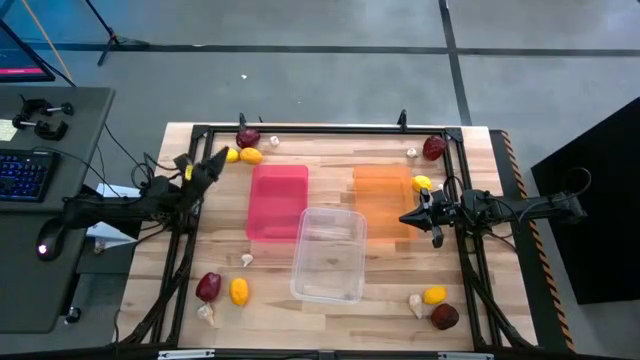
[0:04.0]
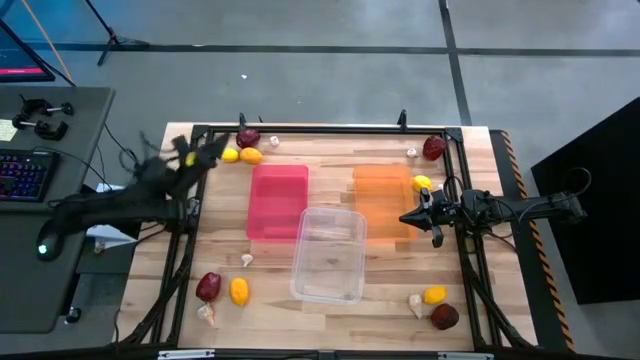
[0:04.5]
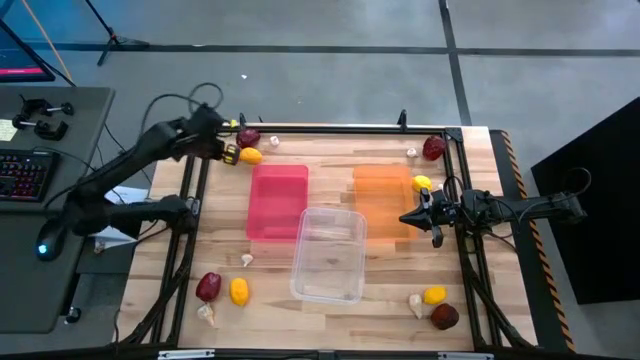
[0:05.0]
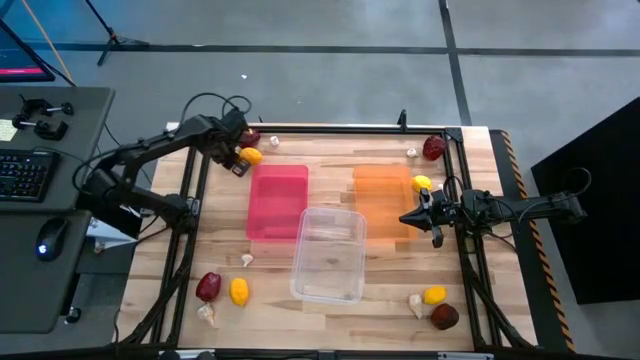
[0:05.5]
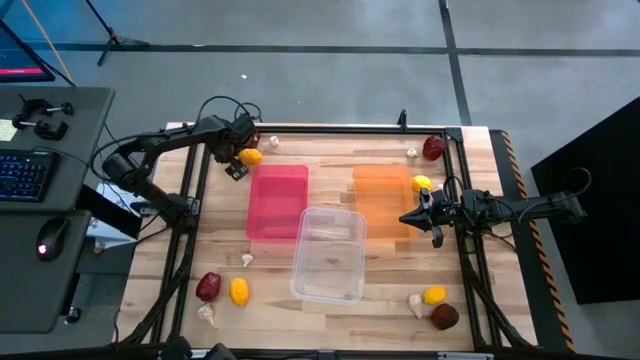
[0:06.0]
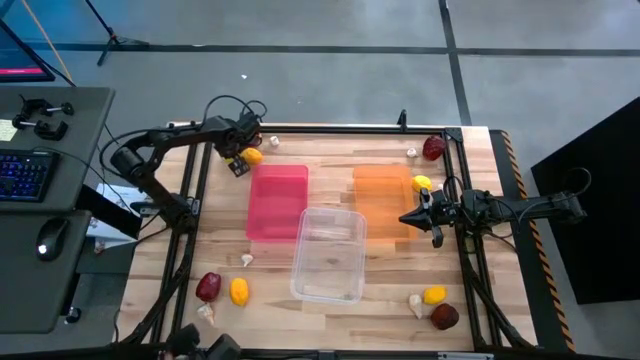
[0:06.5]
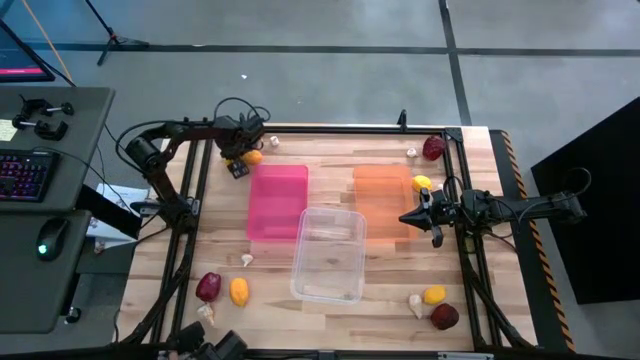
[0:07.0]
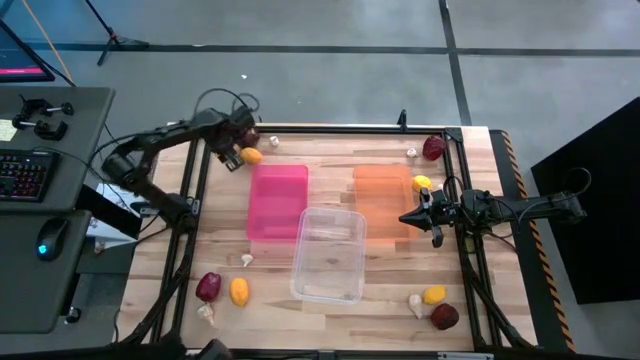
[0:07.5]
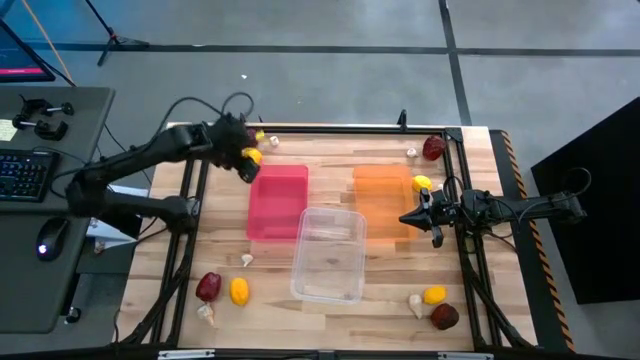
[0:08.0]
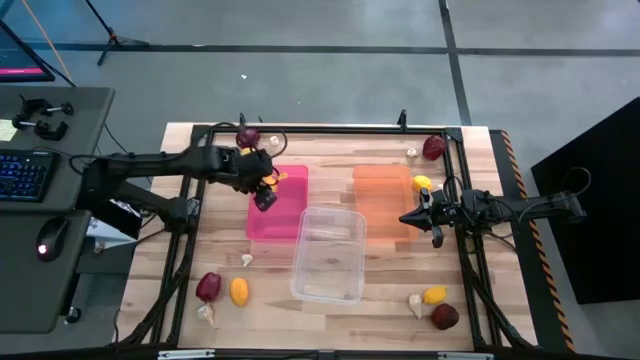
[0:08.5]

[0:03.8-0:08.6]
Task: Sort produce into baskets
Put the lemon into the pink bin

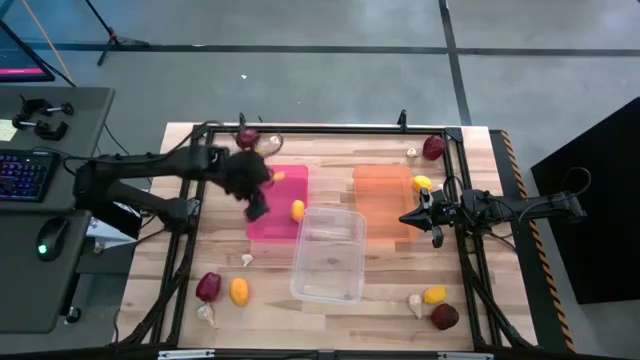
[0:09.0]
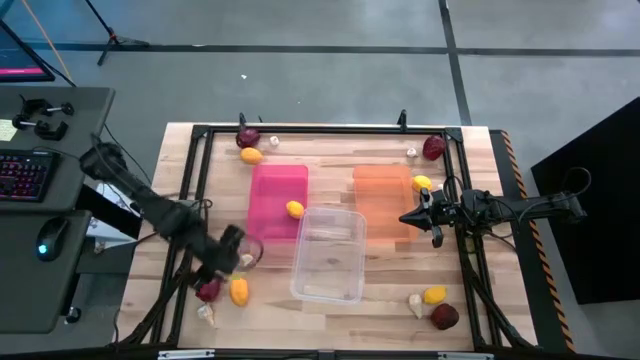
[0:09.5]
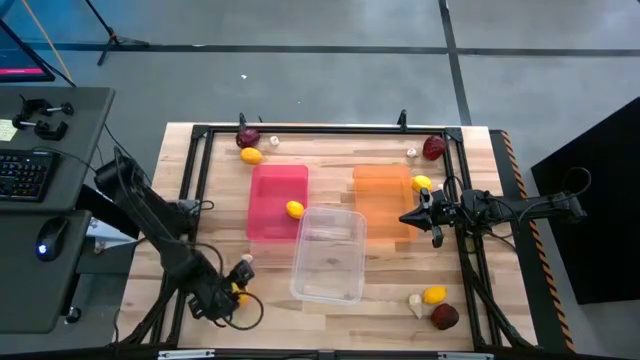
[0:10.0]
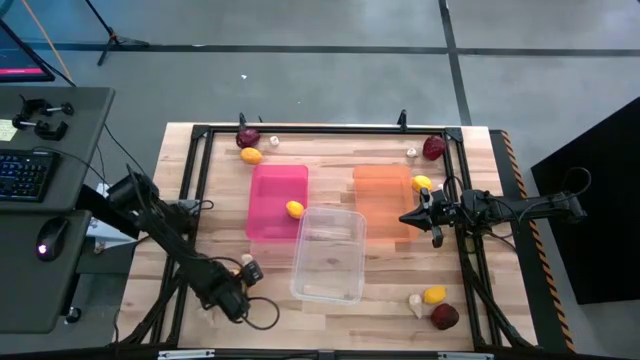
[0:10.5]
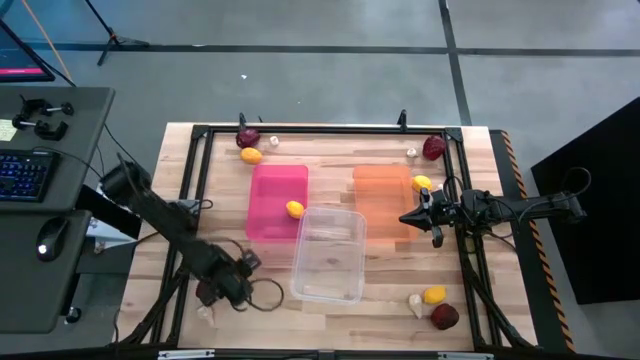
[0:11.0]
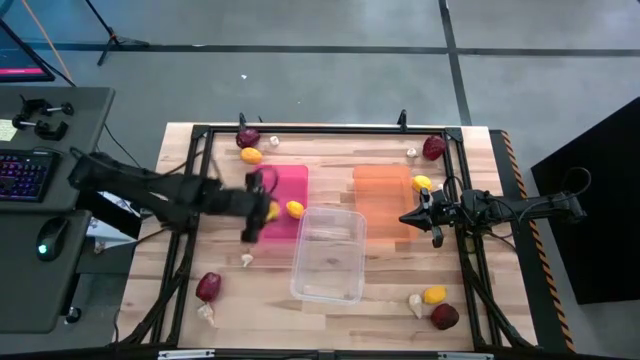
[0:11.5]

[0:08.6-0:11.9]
Put the lemon into the pink bin

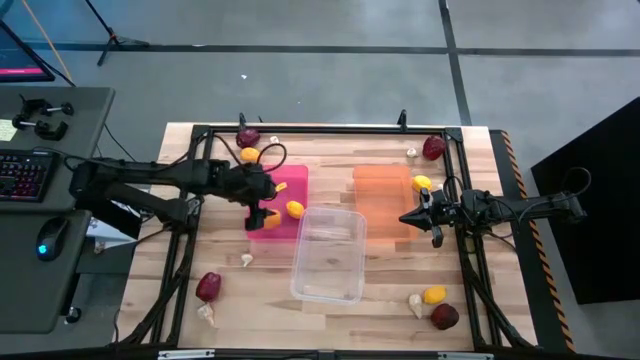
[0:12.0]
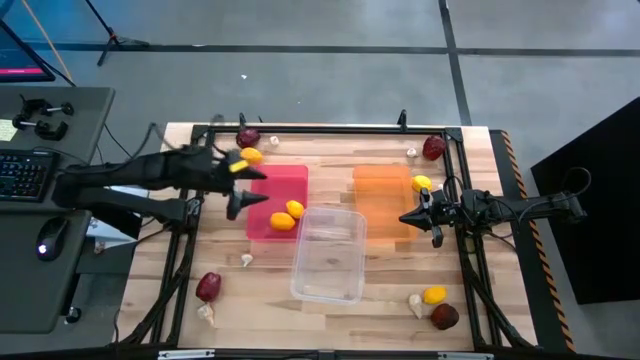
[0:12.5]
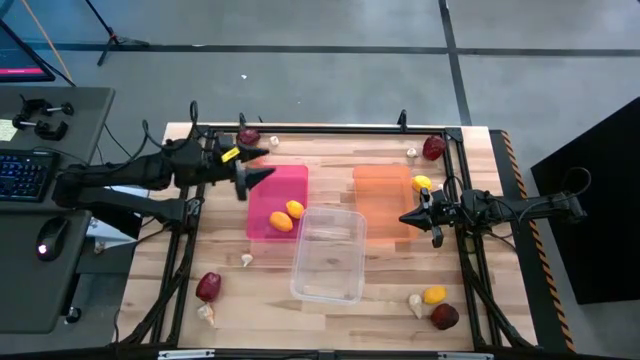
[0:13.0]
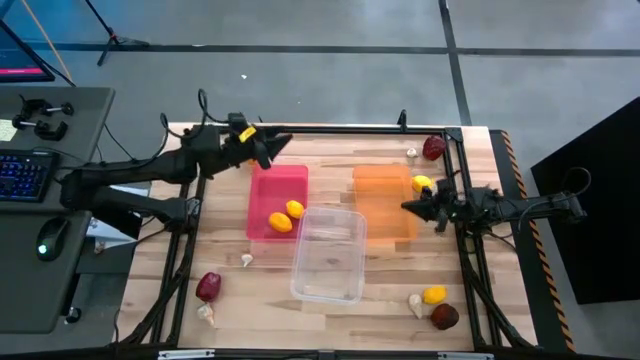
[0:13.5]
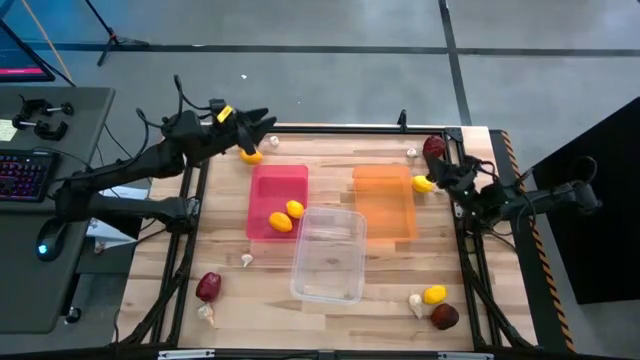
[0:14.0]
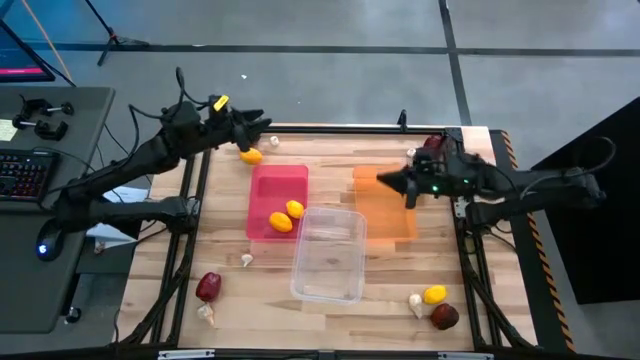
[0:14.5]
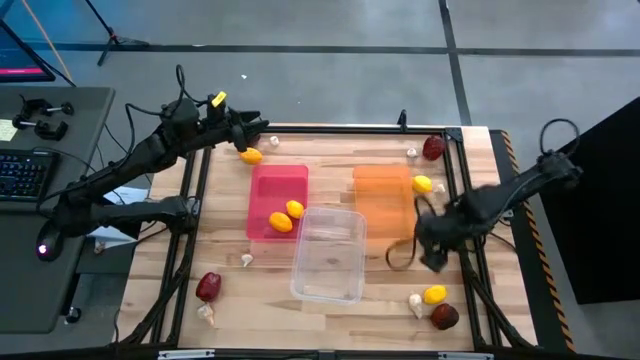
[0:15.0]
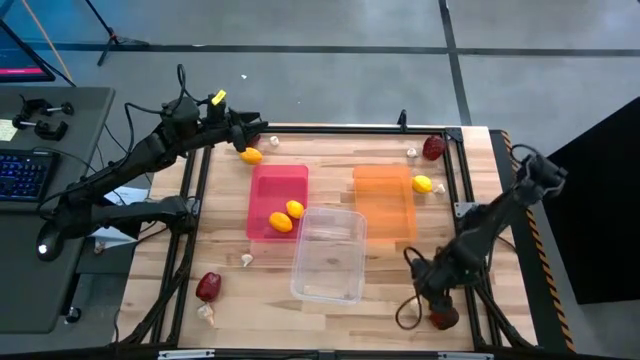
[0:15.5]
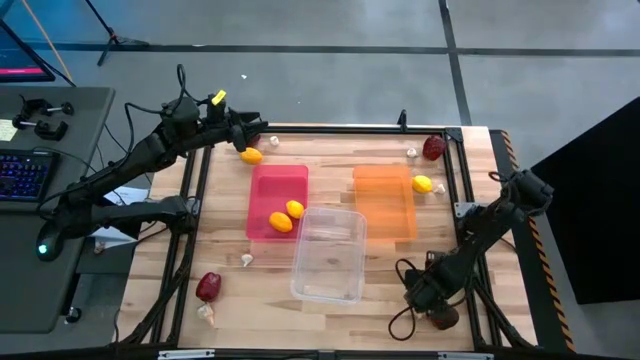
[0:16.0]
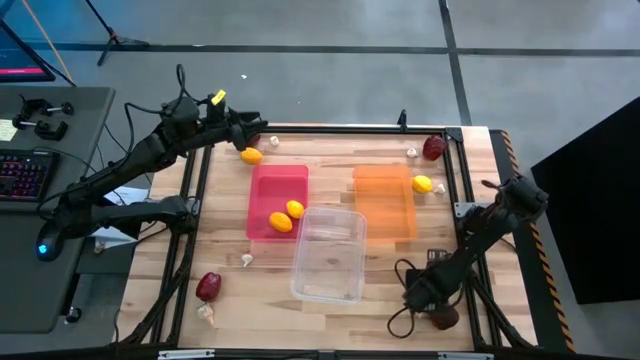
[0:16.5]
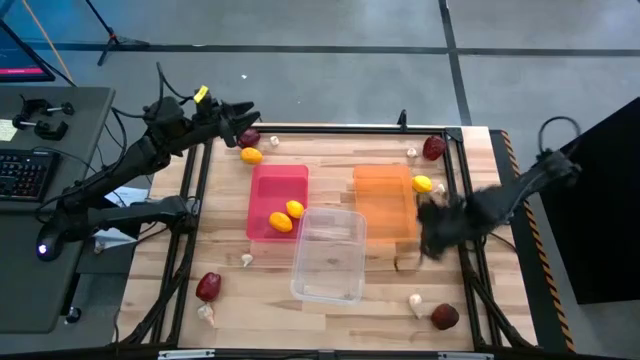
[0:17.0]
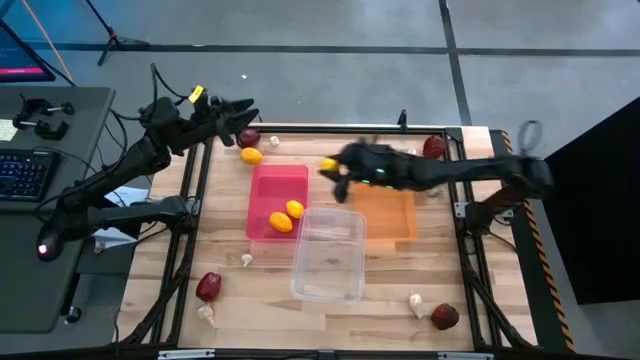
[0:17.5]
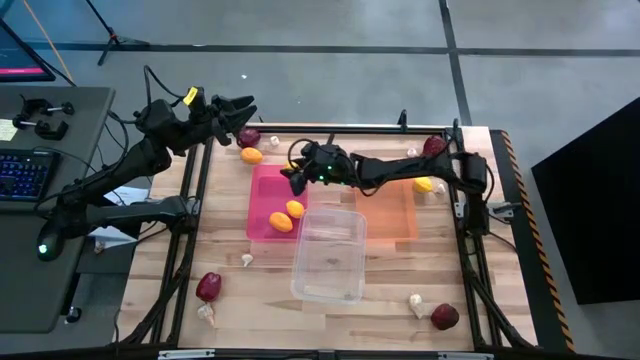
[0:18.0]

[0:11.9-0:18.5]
Put the lemon into the pink bin

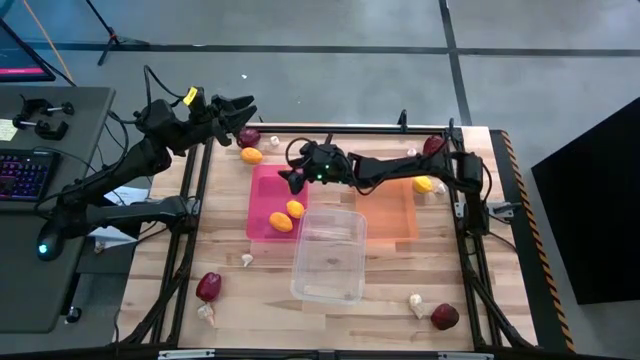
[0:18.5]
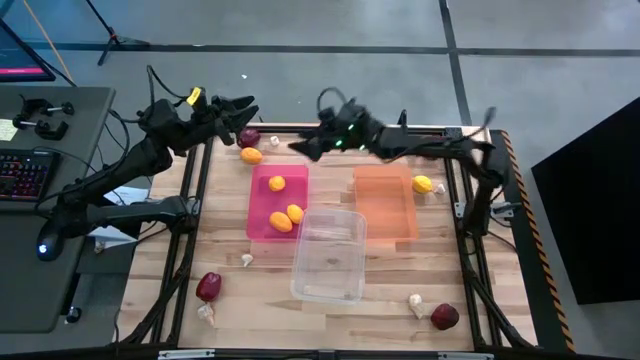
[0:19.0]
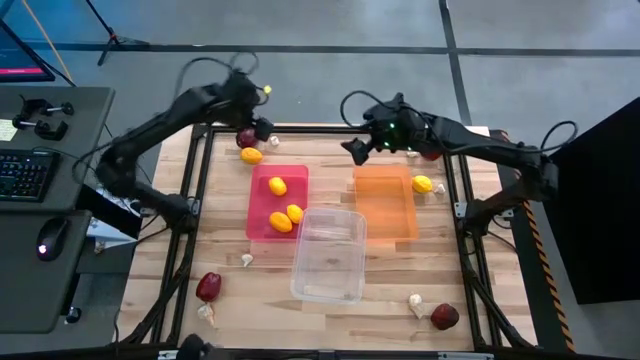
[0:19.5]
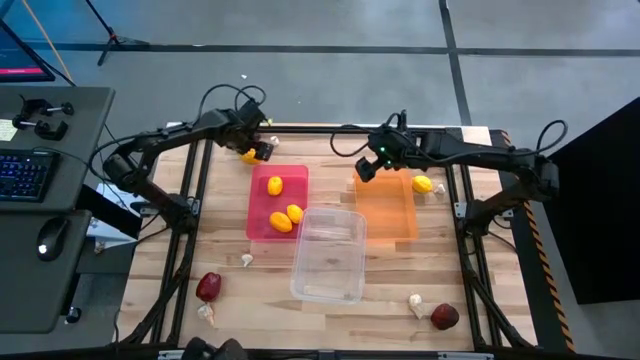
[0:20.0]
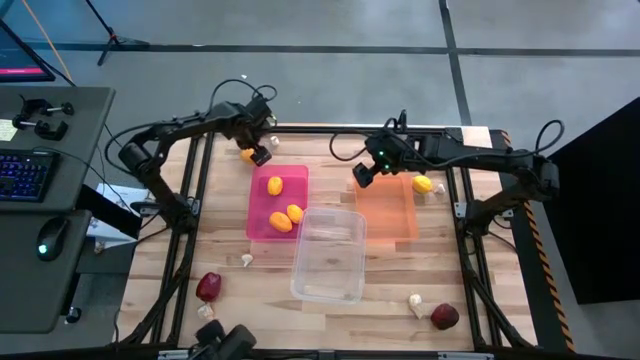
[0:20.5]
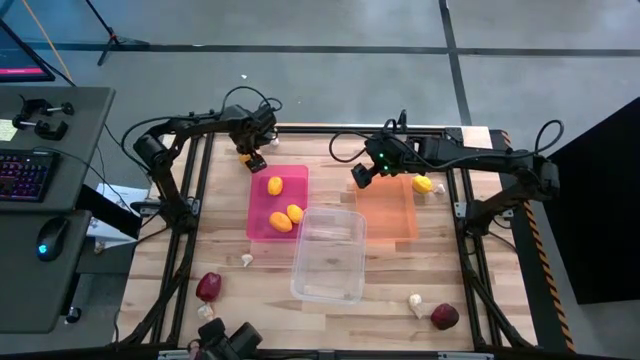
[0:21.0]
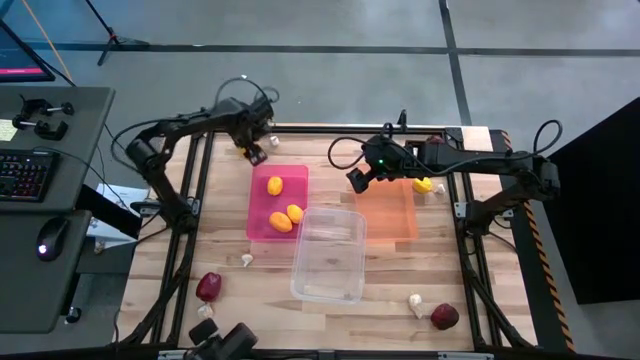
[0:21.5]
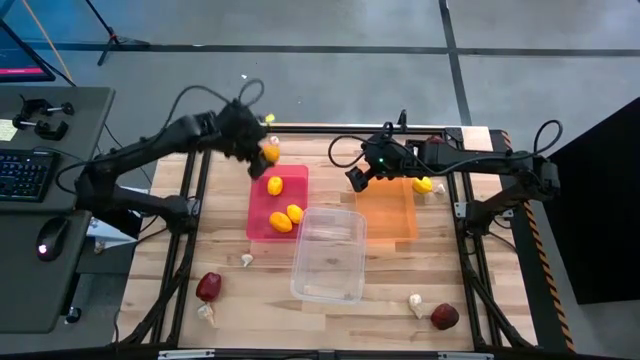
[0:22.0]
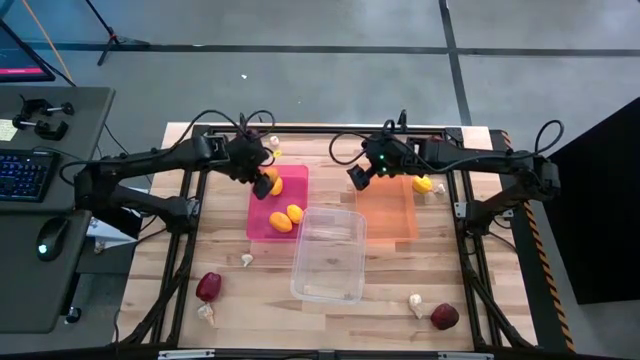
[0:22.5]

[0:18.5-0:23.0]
Put the lemon into the pink bin

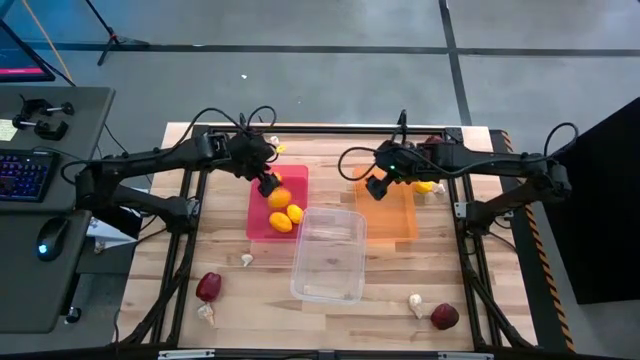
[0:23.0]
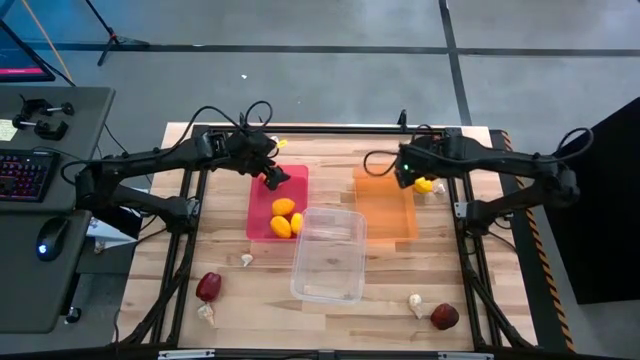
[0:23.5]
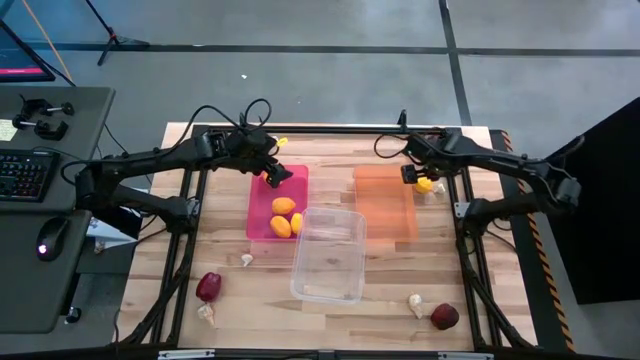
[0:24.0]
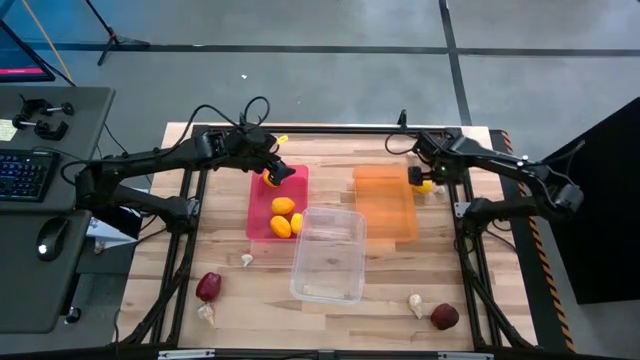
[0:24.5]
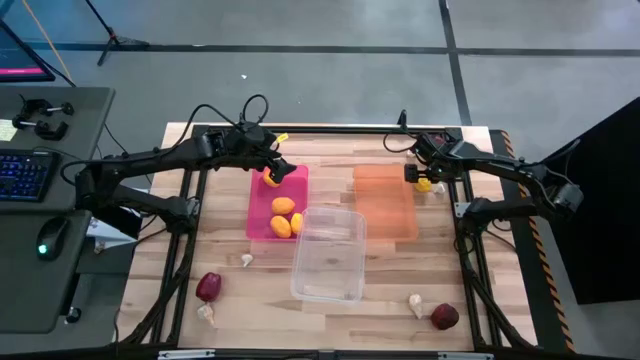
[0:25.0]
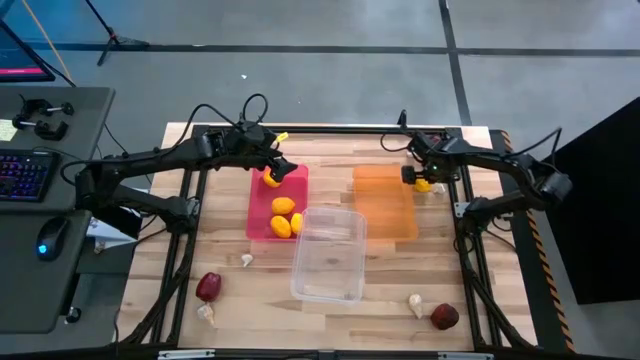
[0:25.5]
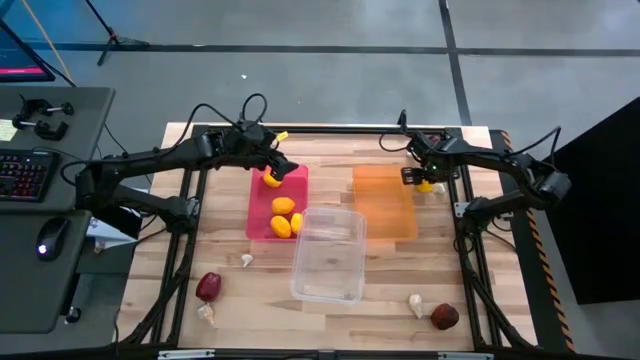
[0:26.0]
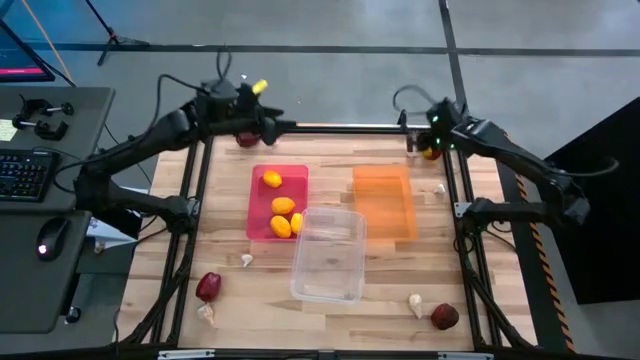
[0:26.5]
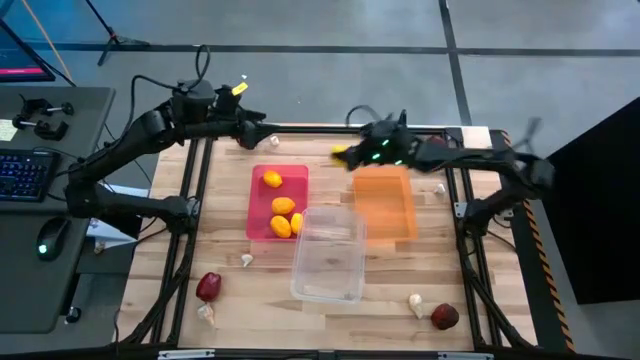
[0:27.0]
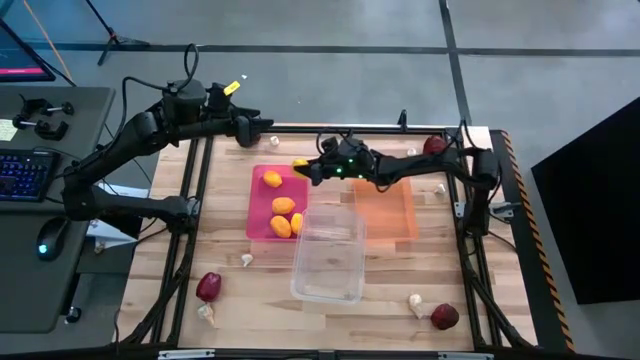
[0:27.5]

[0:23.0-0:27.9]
Put the lemon into the pink bin
